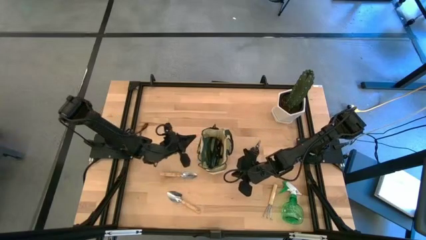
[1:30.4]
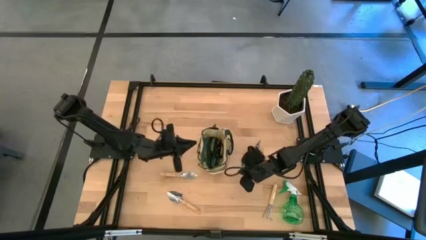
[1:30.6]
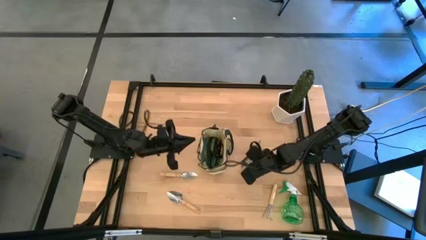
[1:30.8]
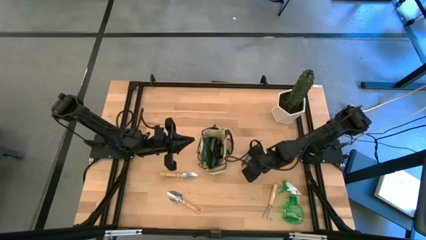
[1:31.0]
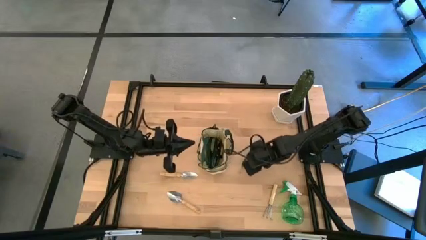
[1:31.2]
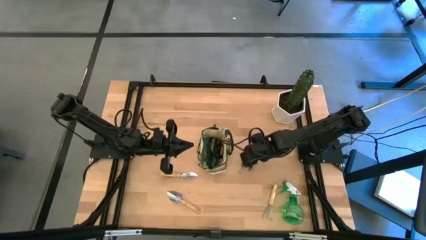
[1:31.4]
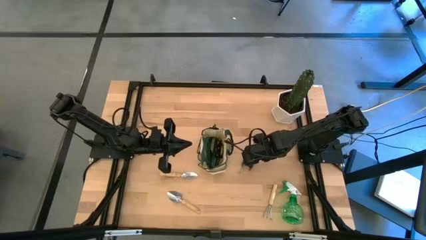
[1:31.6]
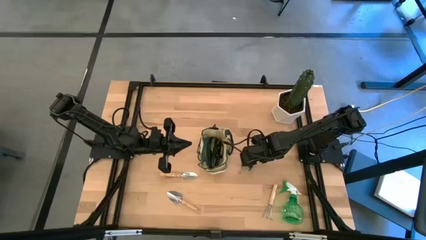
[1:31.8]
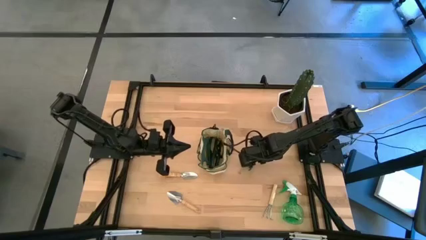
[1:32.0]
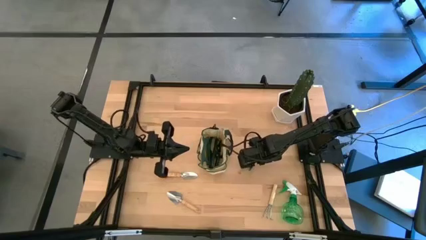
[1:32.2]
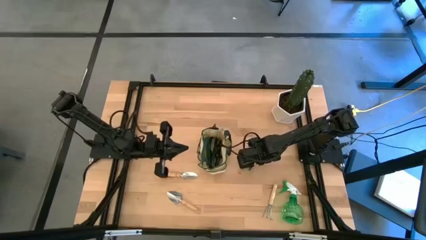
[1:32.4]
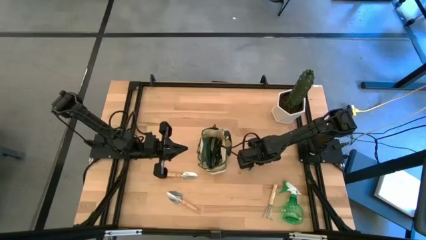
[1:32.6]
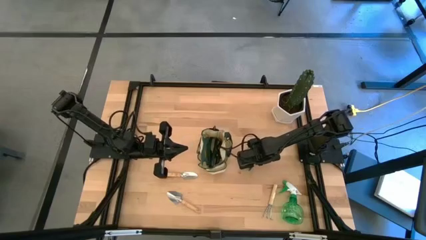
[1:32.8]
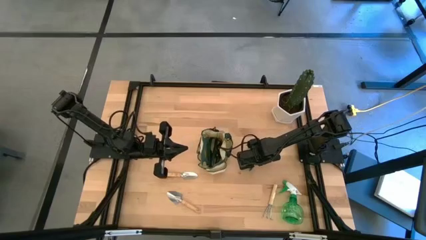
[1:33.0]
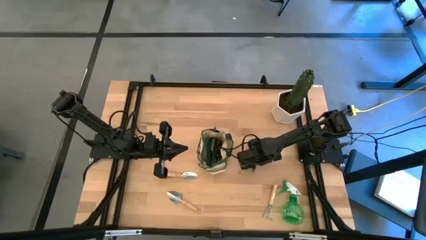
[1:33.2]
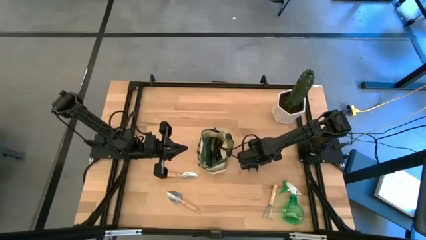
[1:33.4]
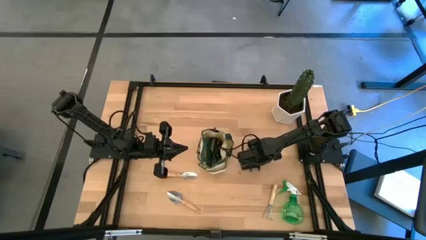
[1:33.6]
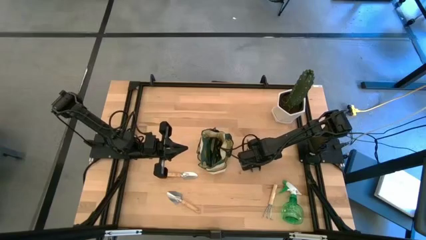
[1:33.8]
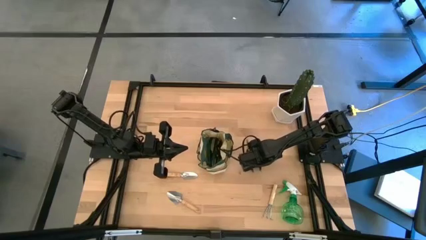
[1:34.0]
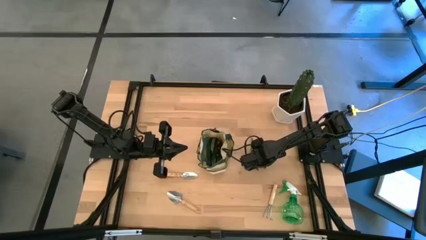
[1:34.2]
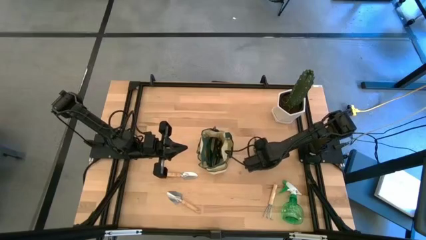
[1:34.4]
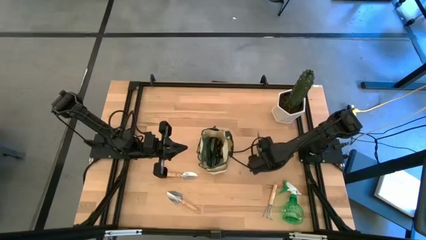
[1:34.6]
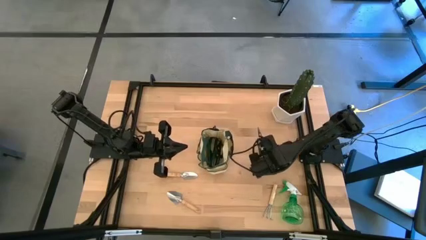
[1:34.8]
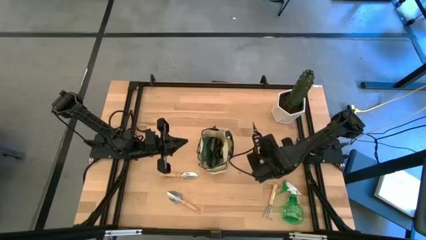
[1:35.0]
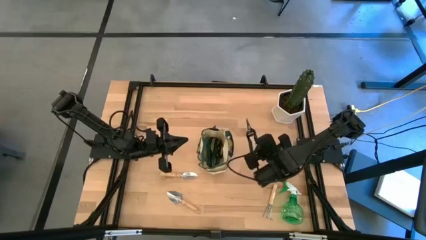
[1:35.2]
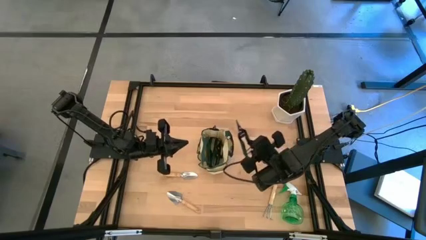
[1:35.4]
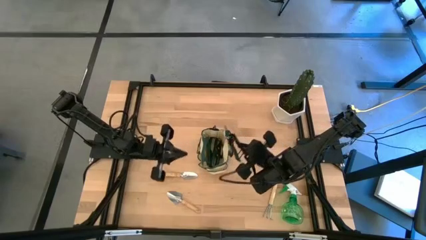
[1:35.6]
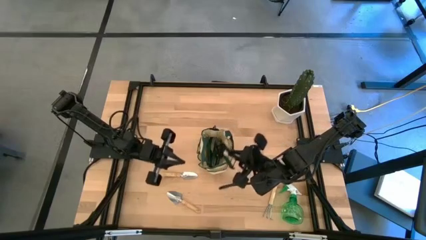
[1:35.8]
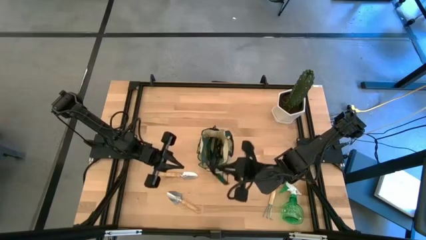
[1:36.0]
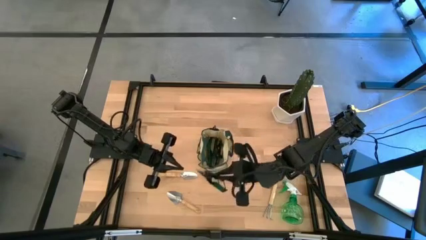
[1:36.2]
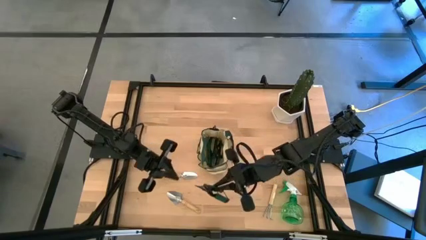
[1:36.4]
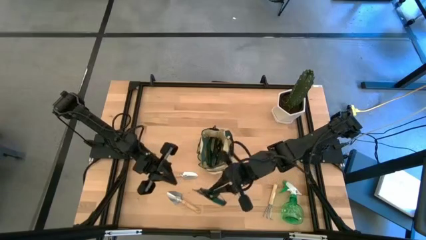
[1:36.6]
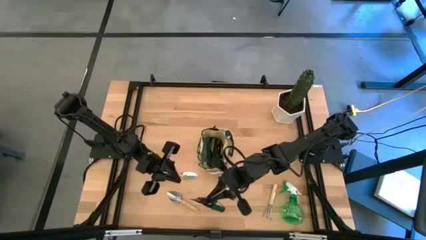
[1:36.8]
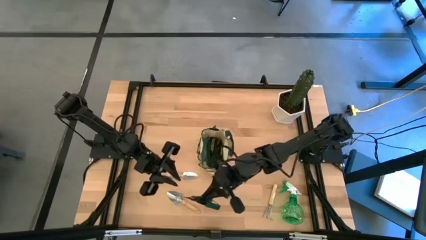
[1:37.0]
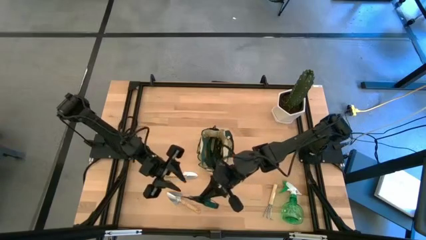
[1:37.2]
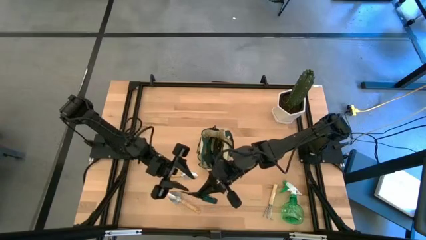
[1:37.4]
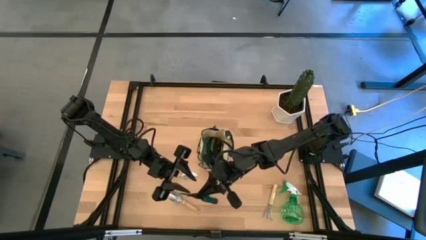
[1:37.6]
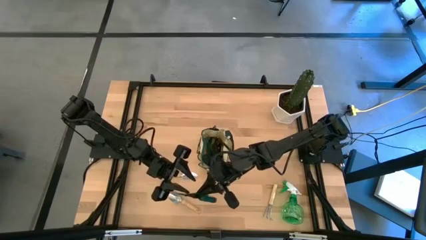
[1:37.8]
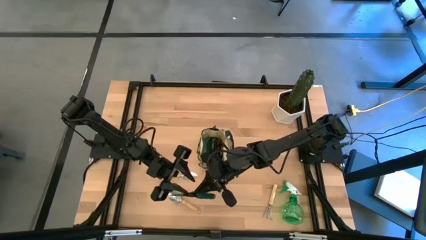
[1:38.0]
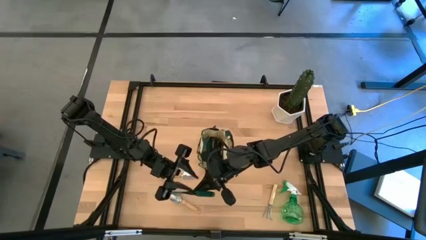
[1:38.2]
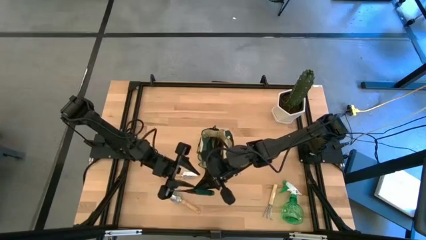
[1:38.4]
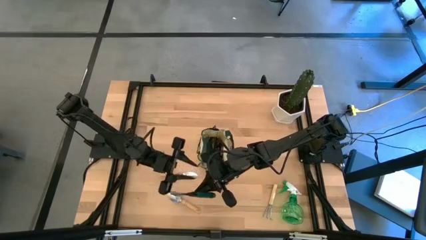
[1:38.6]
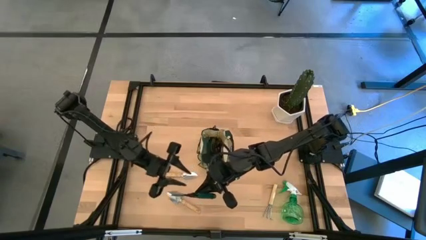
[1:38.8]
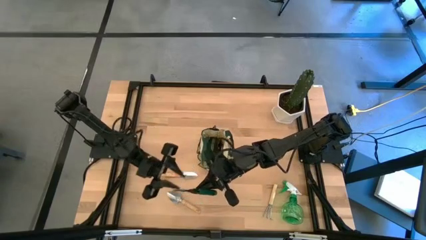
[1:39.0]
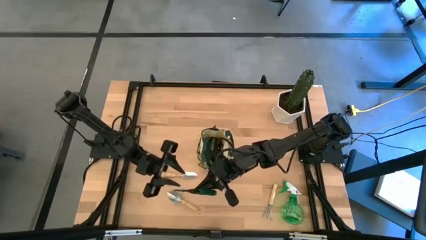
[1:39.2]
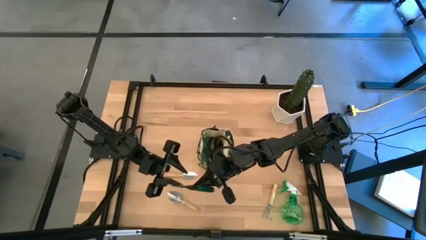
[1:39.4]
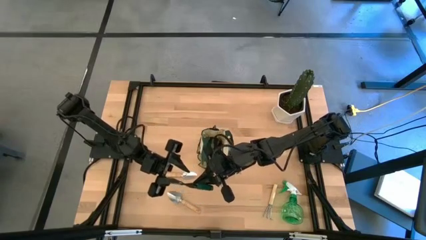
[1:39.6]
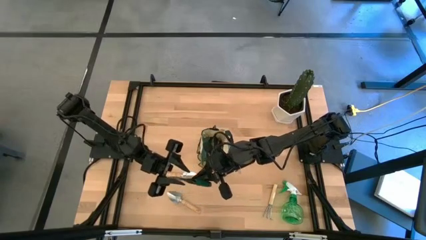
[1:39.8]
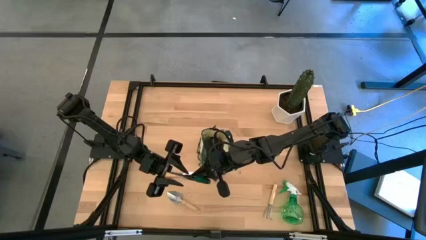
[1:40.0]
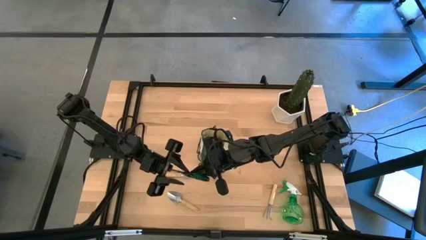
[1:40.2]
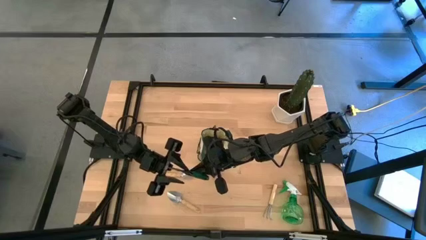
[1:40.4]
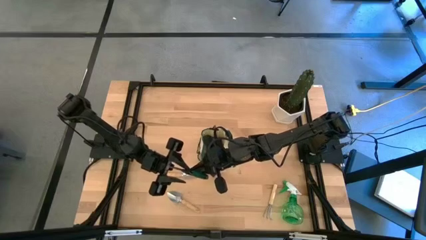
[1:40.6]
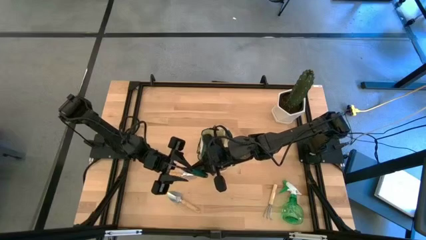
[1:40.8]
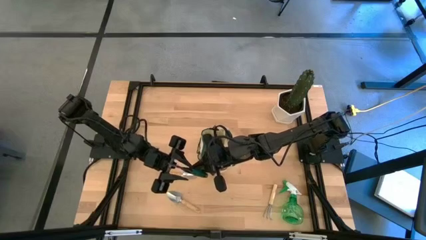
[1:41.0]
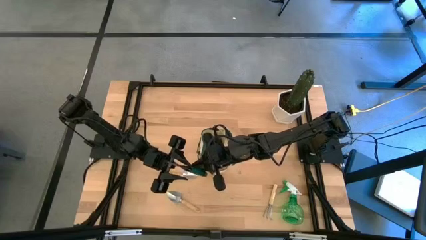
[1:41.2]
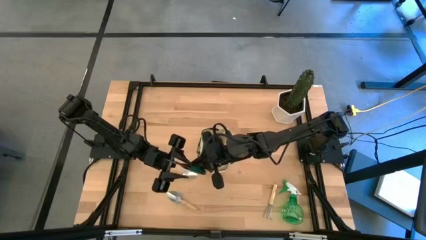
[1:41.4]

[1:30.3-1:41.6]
Task: Pick & Place Garden tools in Gardening bag
Put the green fruit pruner into the green gardening bag

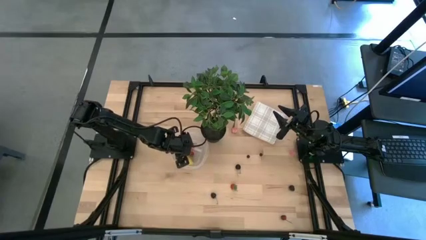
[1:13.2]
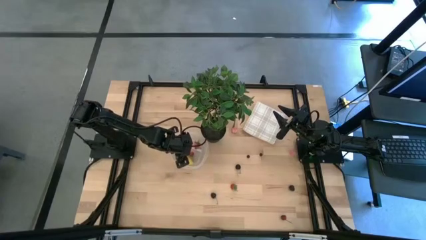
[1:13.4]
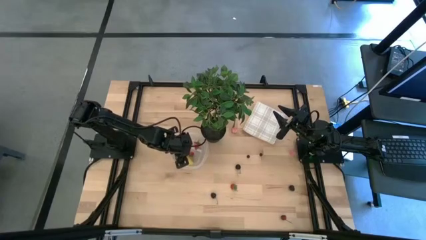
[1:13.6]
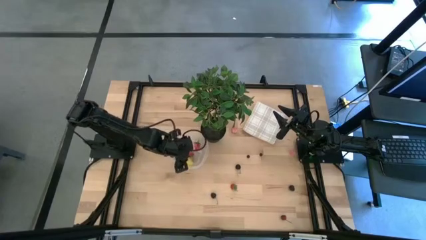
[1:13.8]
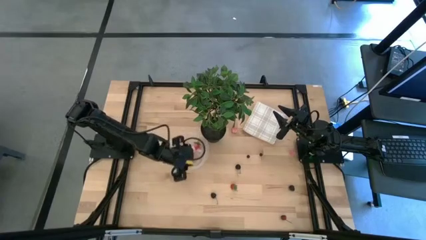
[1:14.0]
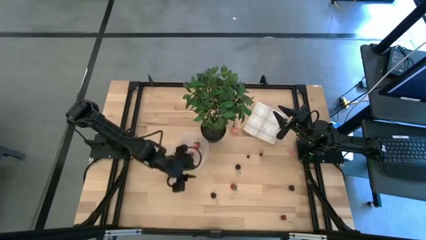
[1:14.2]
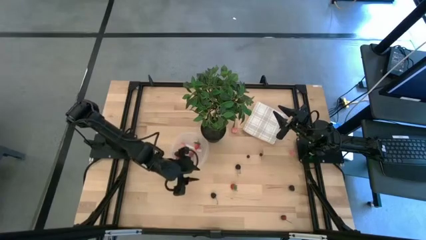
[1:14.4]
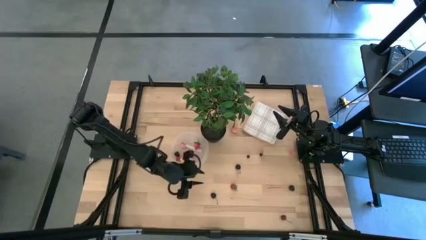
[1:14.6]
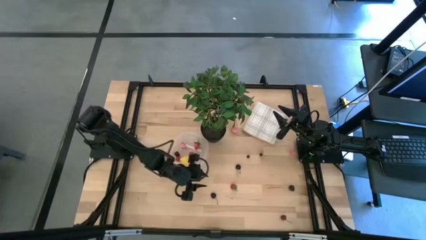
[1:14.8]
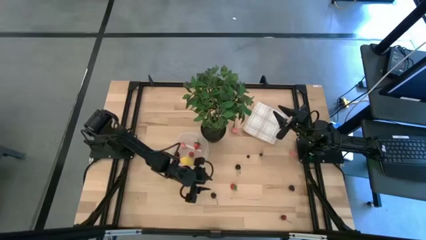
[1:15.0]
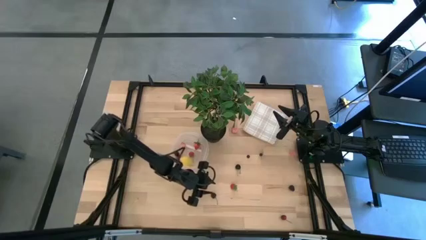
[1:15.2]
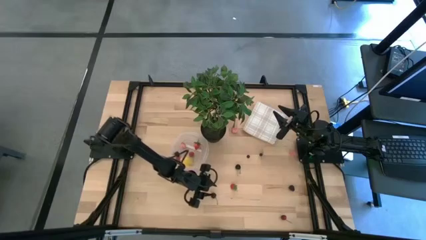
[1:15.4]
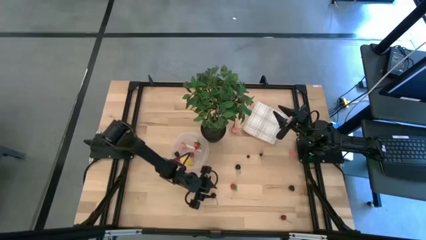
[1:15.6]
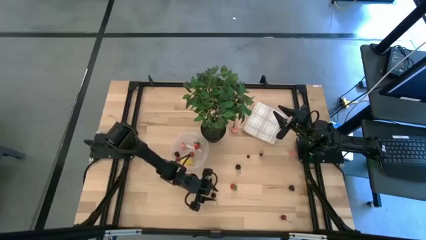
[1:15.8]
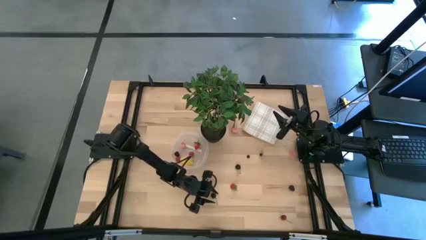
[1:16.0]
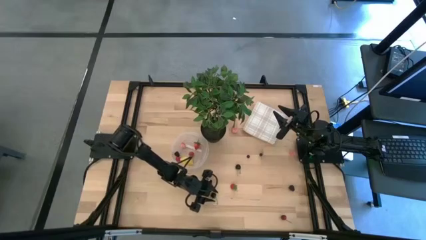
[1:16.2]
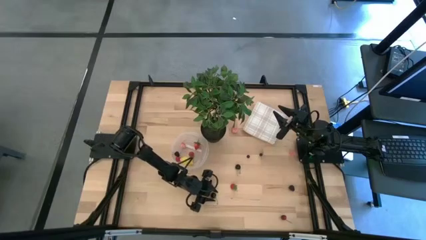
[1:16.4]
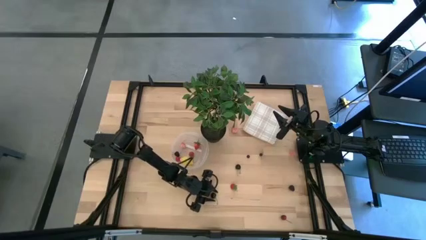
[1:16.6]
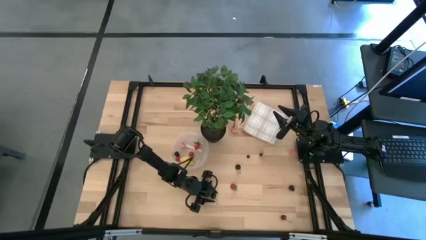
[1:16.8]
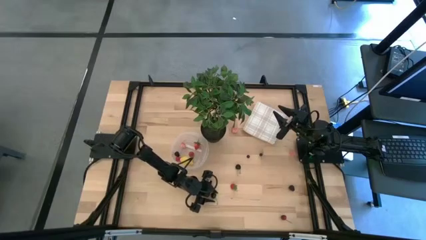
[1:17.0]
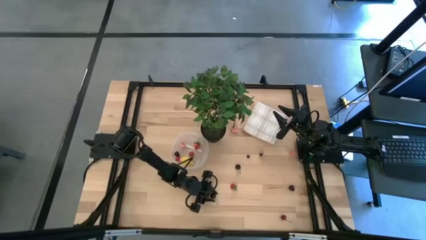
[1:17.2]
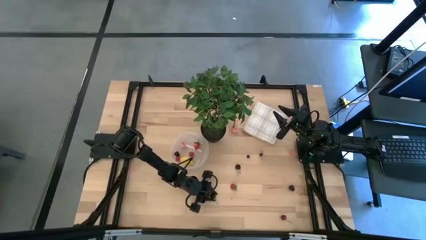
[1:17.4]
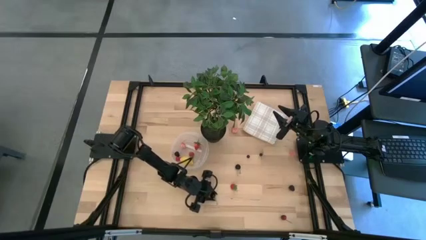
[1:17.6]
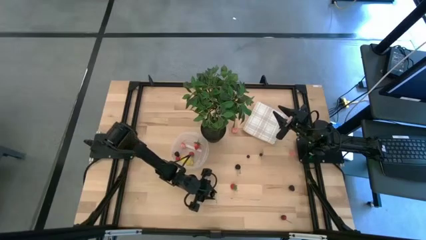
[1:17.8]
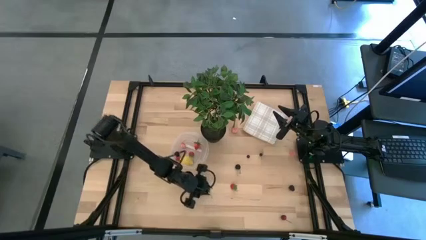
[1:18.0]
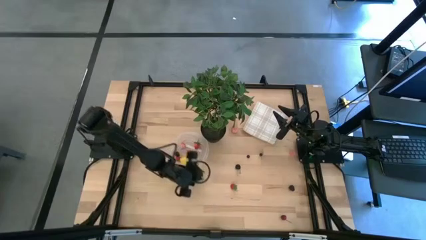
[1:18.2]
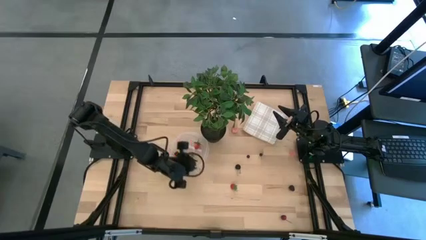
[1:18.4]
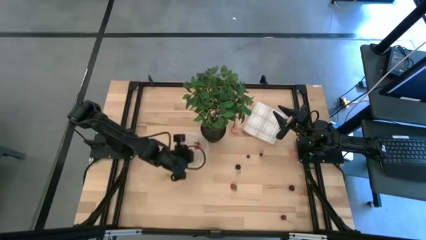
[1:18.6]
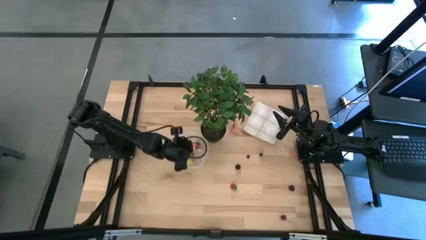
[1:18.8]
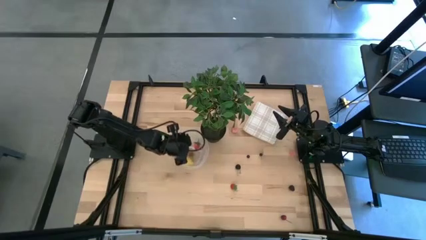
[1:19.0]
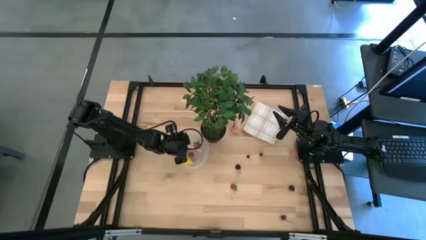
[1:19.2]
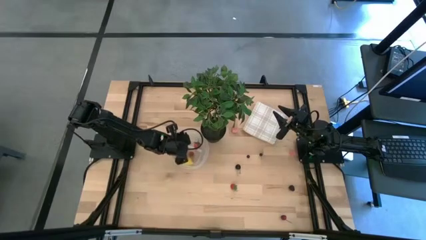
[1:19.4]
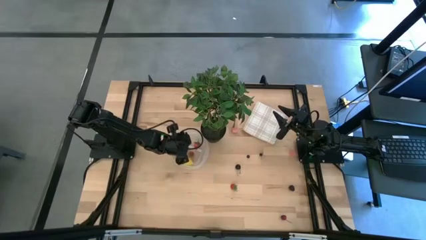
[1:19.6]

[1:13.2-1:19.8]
Task: Pick and placing Produce into tupperware
Put the bottom black cherry into the transparent bin
